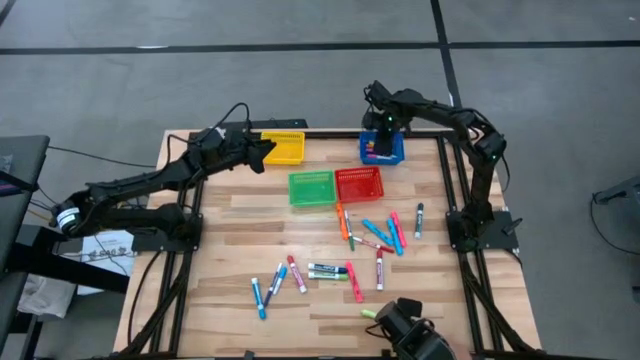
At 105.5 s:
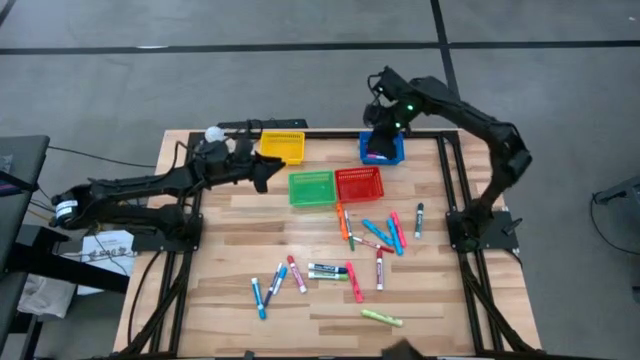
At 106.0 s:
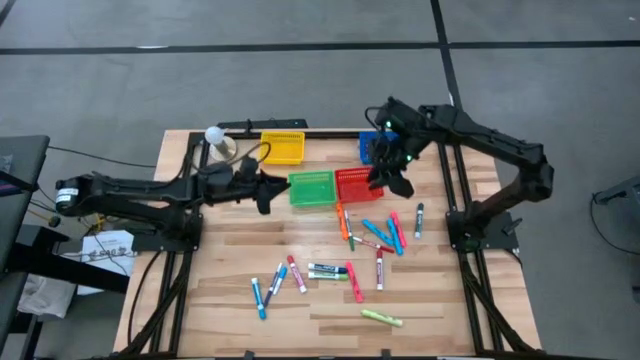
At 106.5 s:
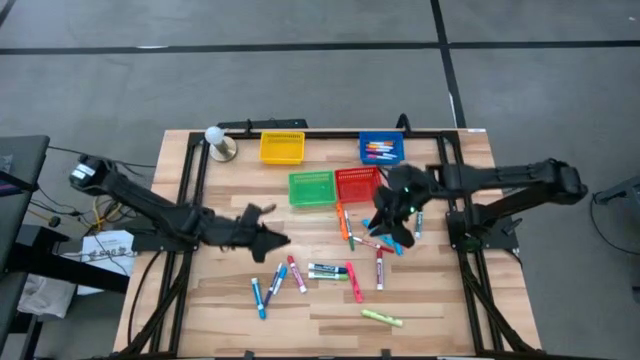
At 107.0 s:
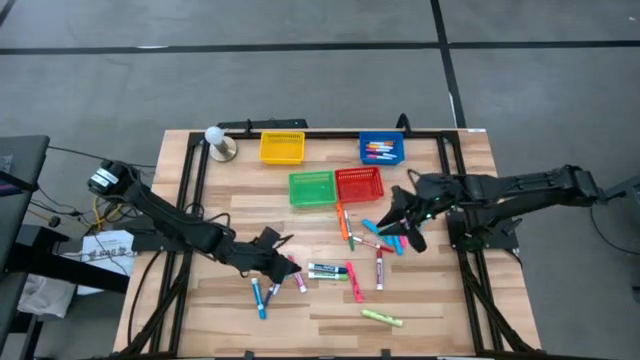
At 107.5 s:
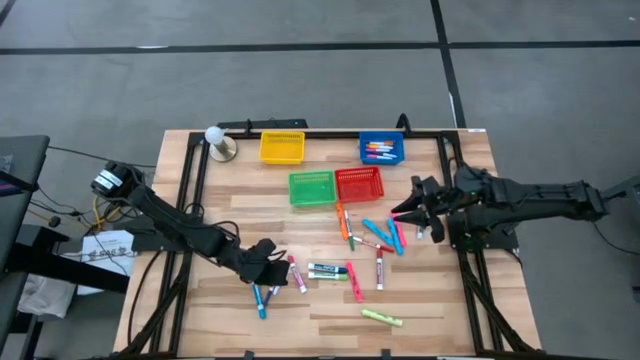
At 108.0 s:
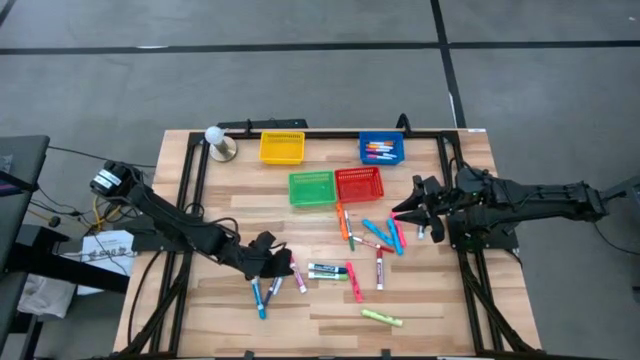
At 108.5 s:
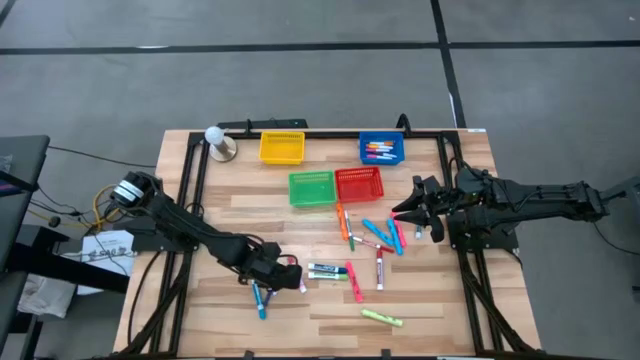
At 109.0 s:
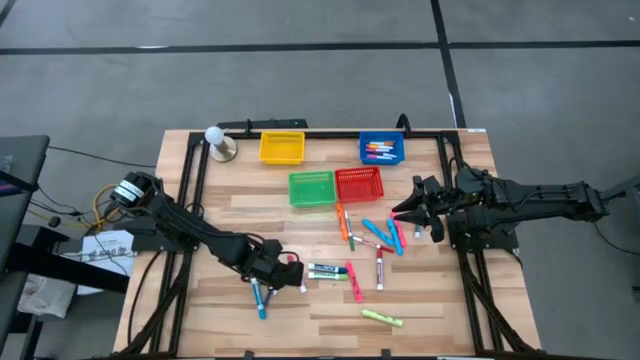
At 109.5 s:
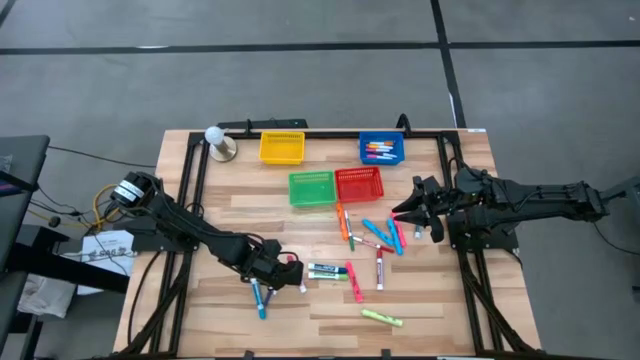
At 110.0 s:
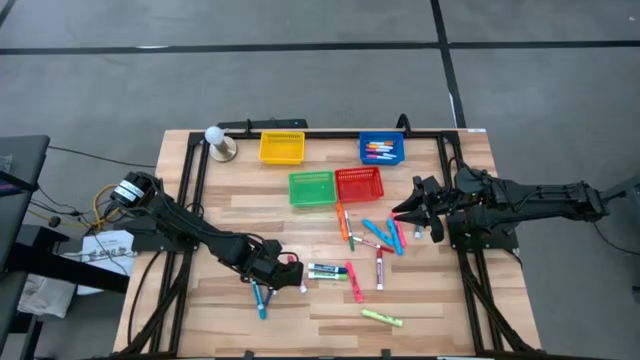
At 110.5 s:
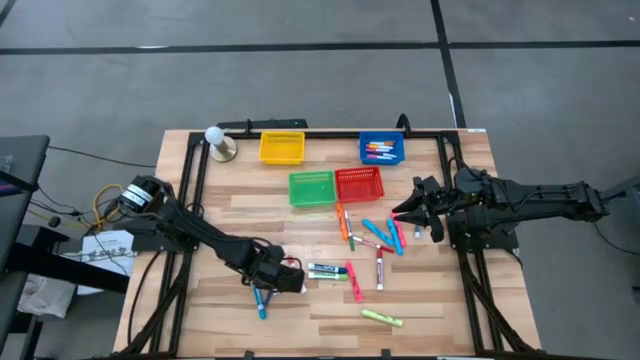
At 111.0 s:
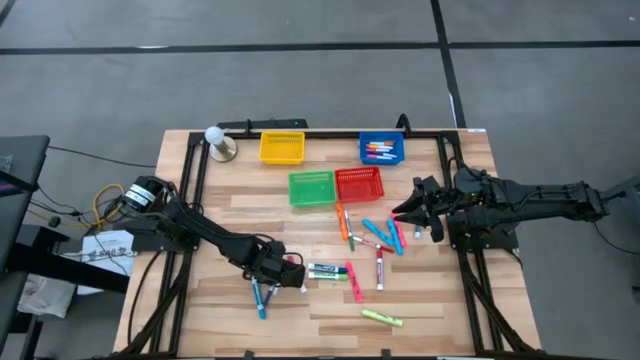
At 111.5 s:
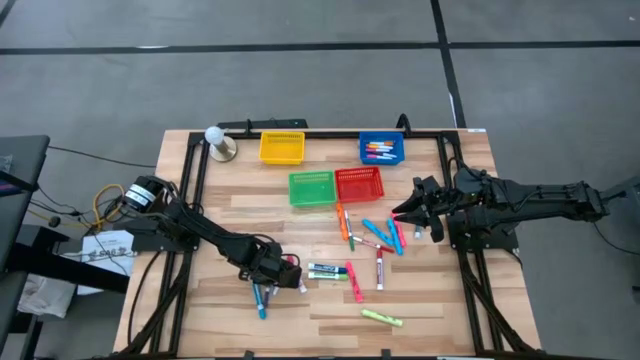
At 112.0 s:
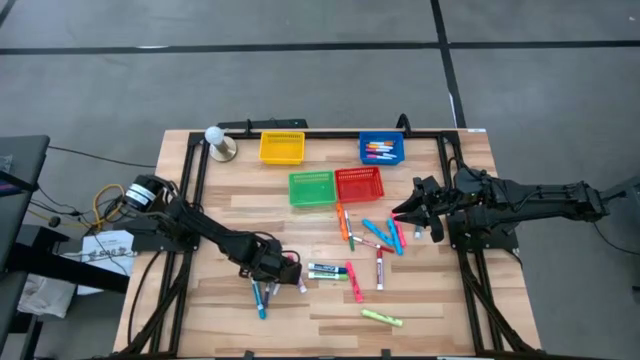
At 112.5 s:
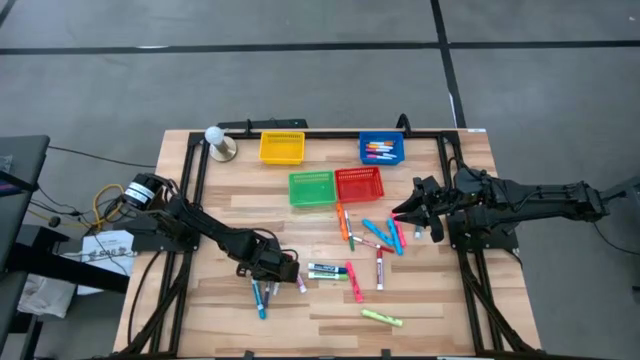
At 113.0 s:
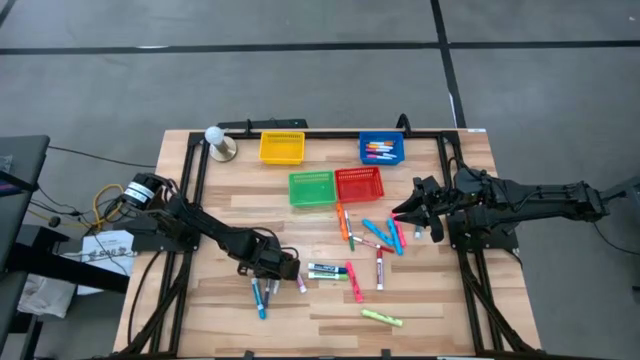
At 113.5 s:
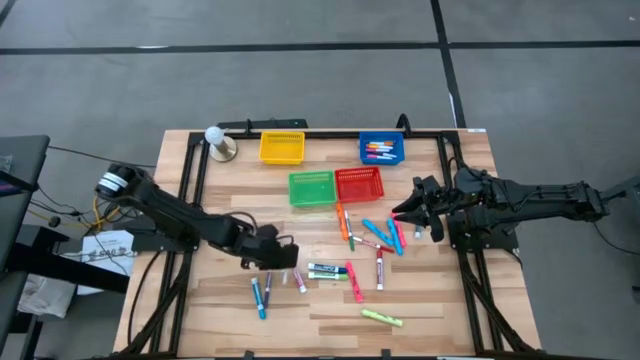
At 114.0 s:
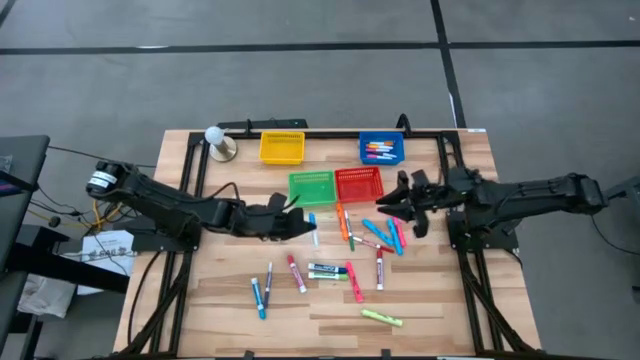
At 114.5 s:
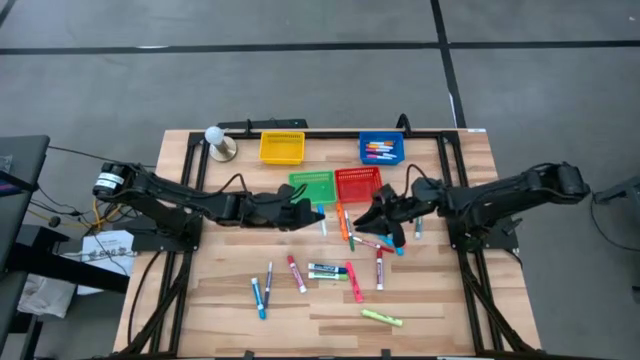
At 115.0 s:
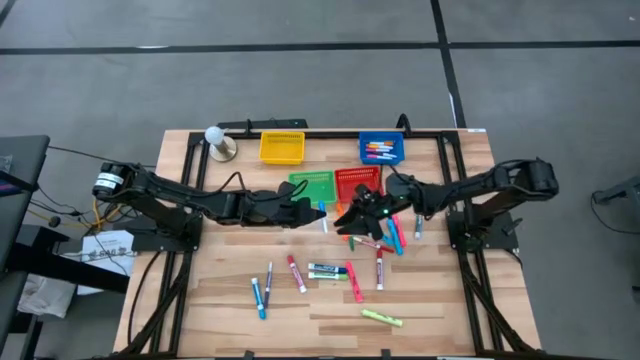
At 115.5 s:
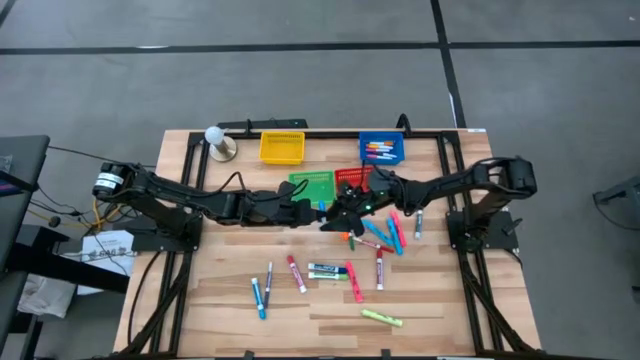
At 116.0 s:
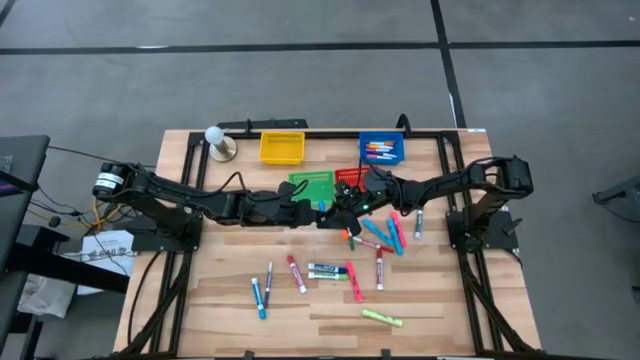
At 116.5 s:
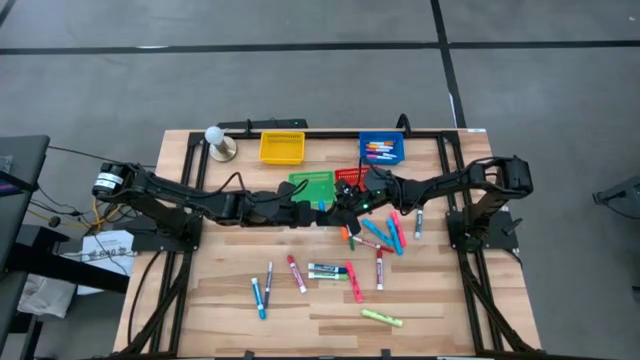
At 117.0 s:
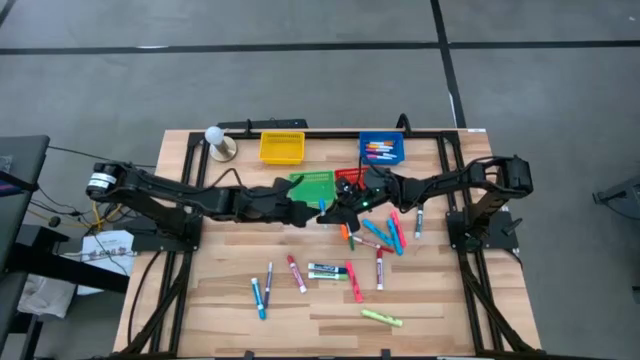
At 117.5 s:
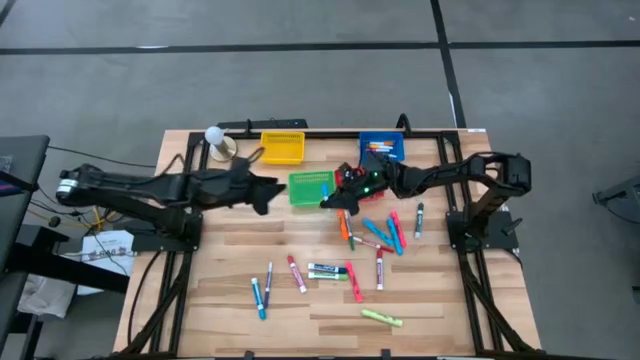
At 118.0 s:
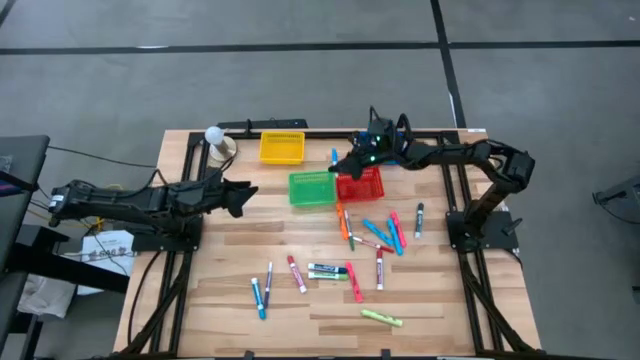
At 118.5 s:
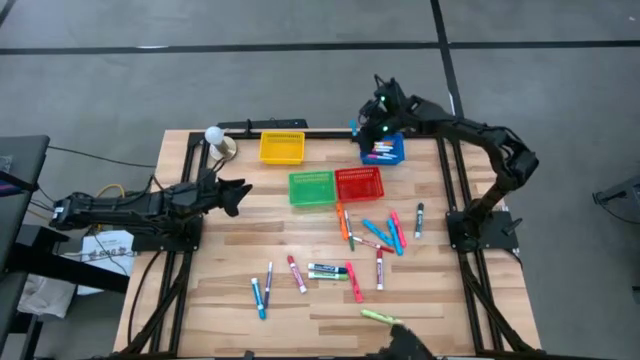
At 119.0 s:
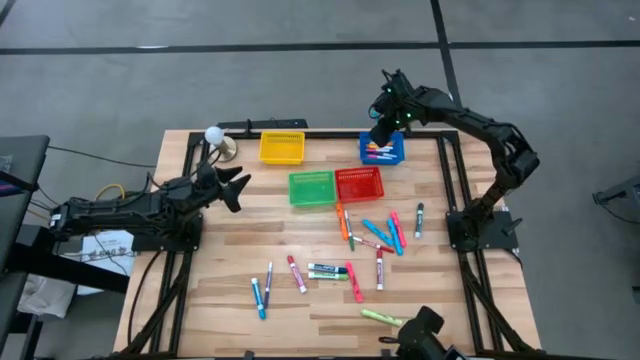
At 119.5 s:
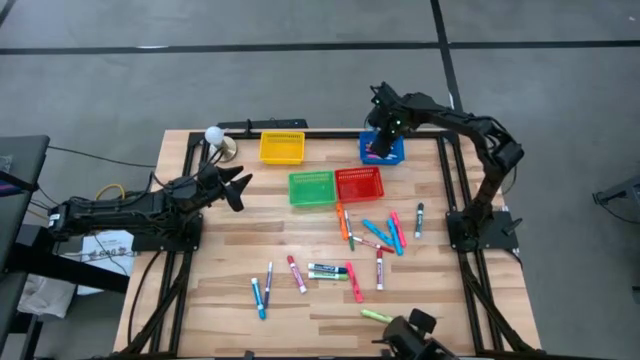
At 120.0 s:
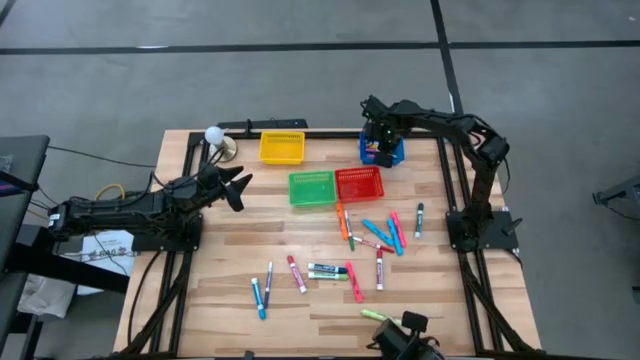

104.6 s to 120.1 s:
Task: Pick & Place Markers
Put the small blue highlighter pen into the blue bin

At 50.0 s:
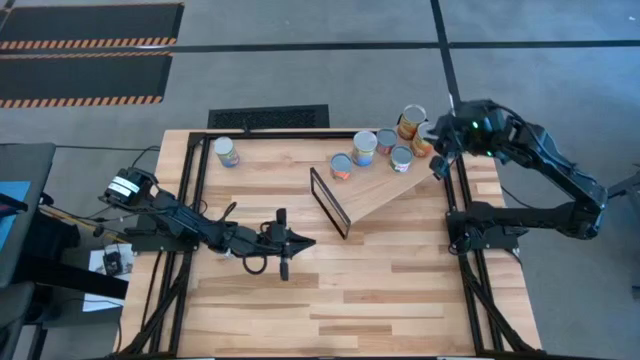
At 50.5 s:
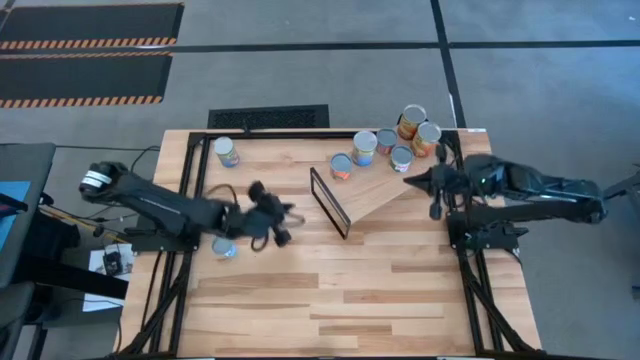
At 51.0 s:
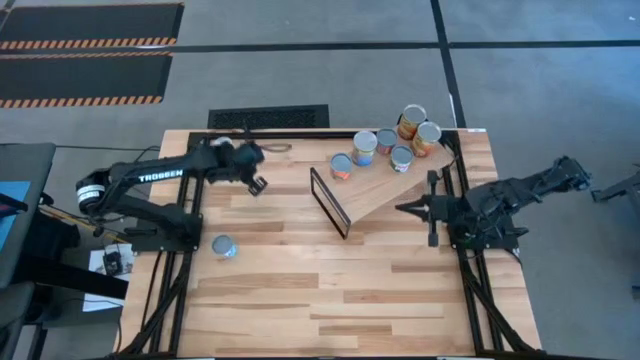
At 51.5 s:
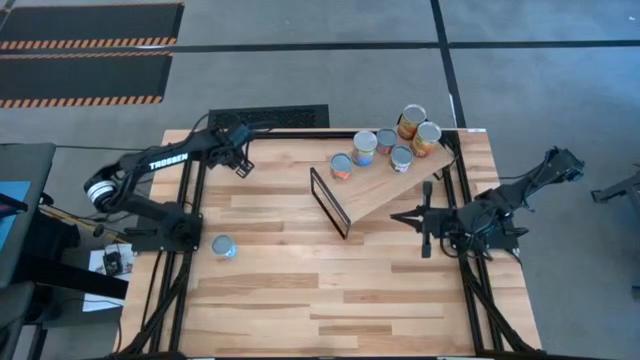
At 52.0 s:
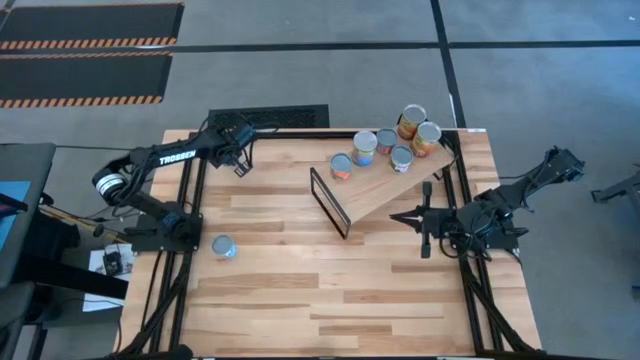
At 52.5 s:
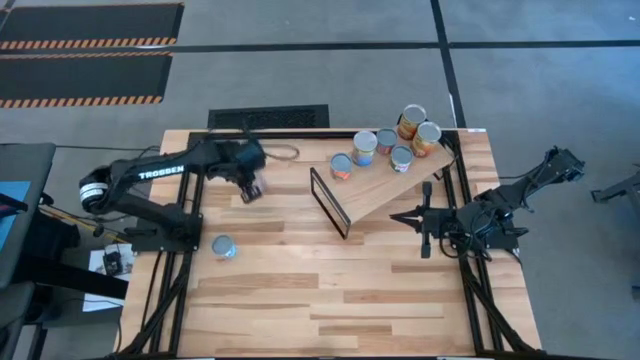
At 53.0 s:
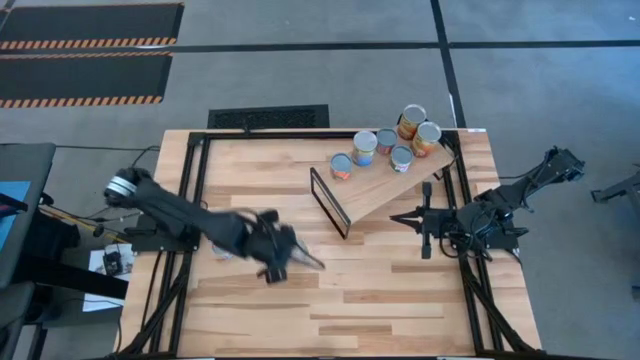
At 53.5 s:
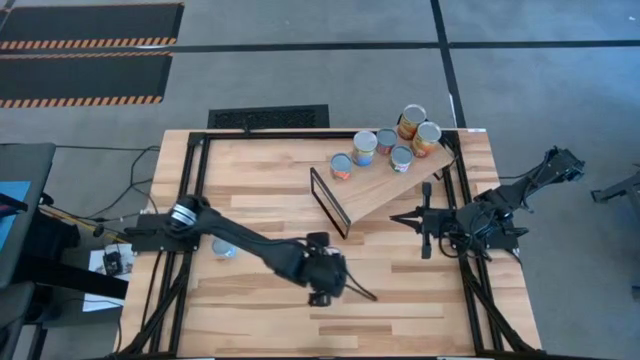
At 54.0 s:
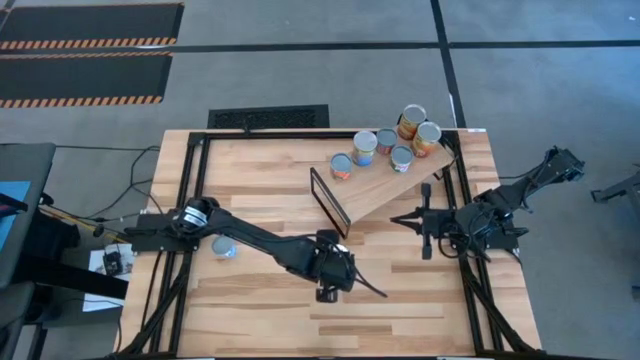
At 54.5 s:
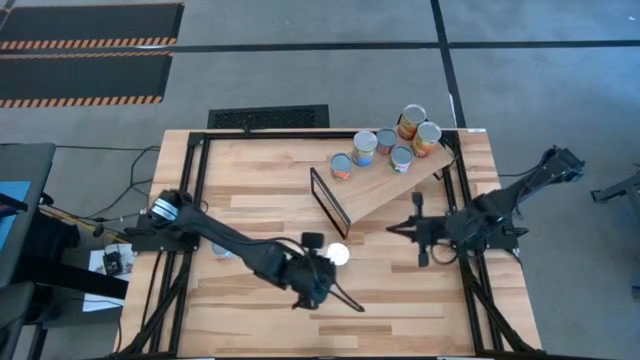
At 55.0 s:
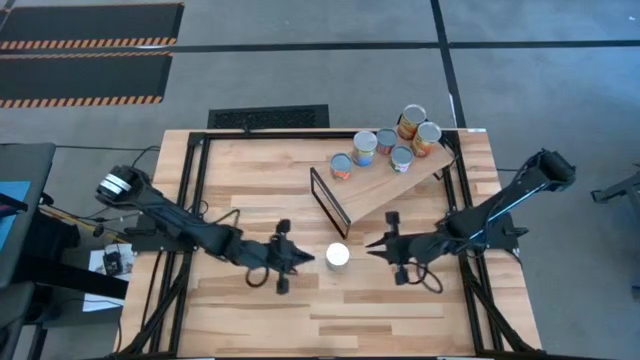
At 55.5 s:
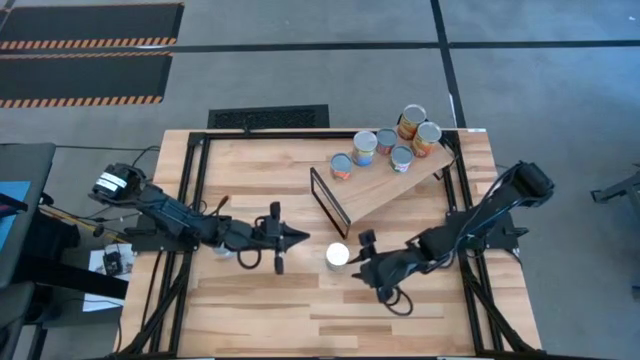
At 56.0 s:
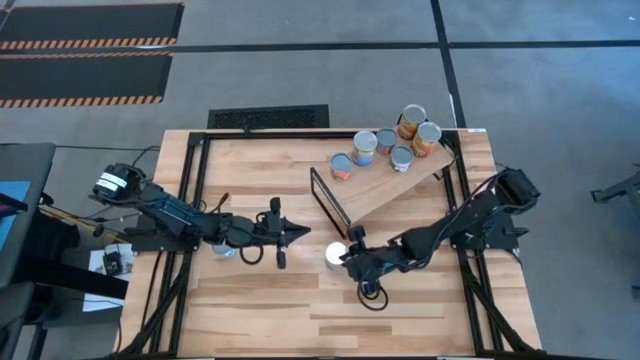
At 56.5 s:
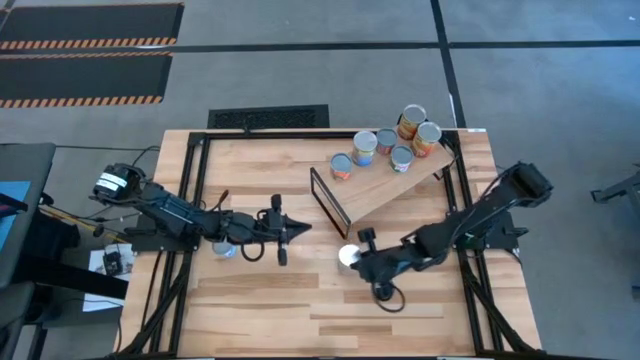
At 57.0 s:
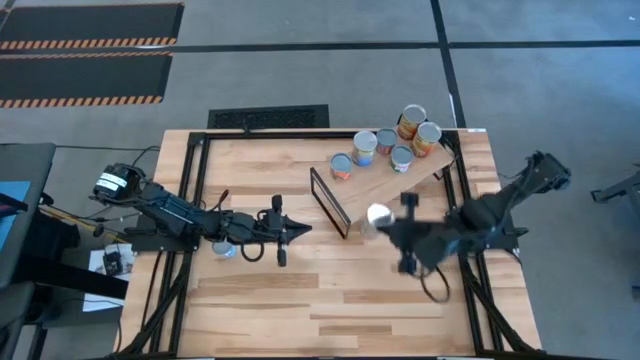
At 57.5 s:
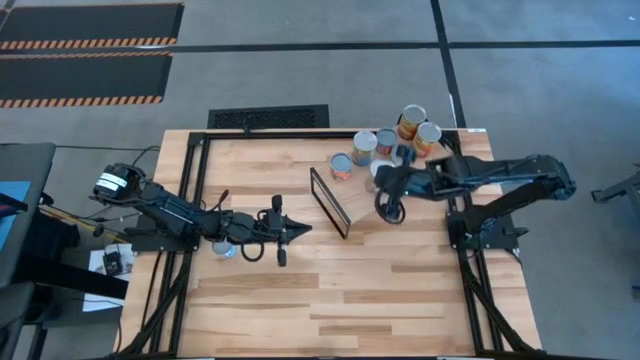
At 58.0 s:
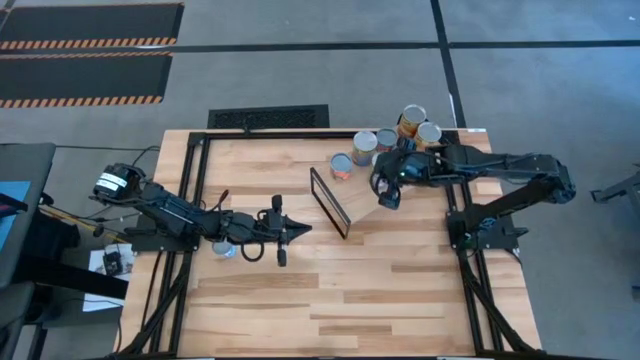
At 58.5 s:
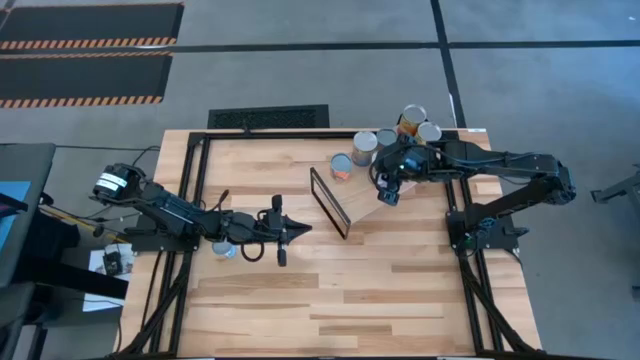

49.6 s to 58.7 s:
Task: Pick and place cans onto a shelf
Put the canned peaches on the shelf aligned with the other canned peaches
